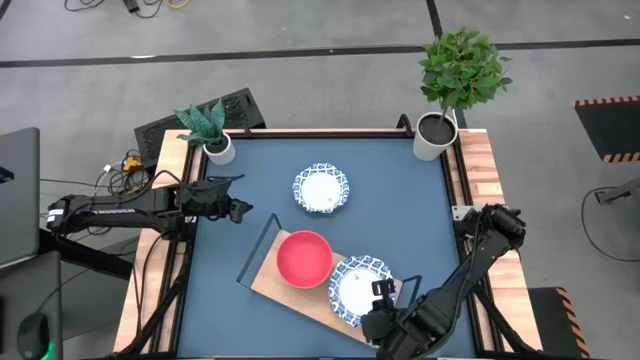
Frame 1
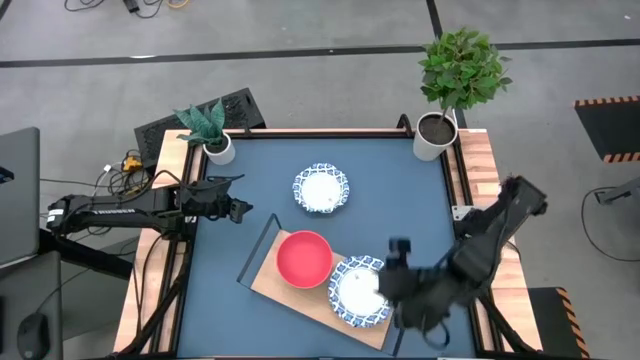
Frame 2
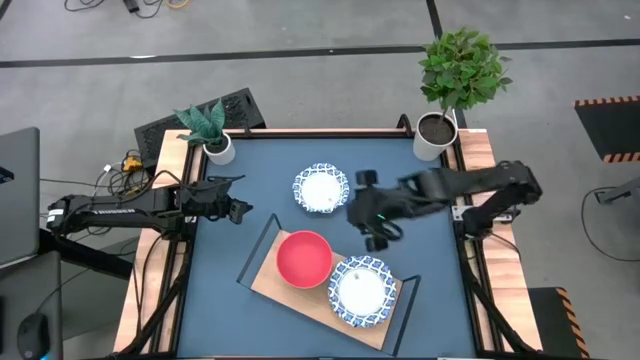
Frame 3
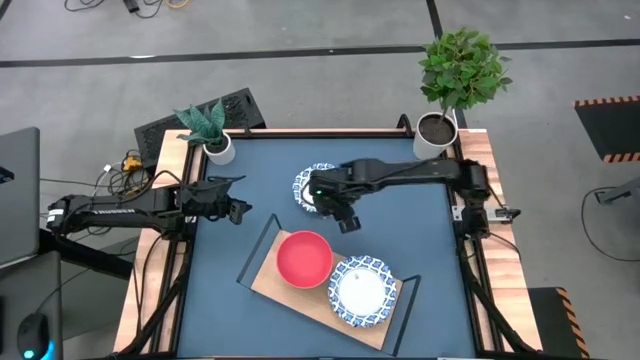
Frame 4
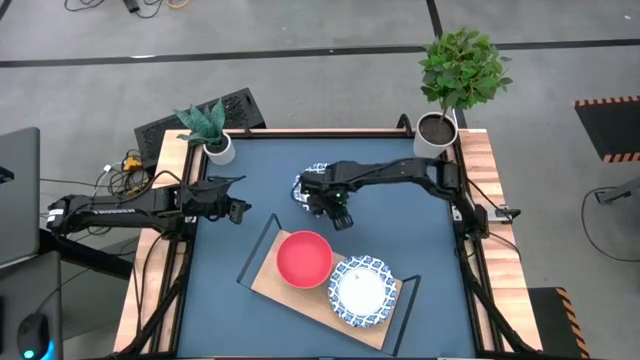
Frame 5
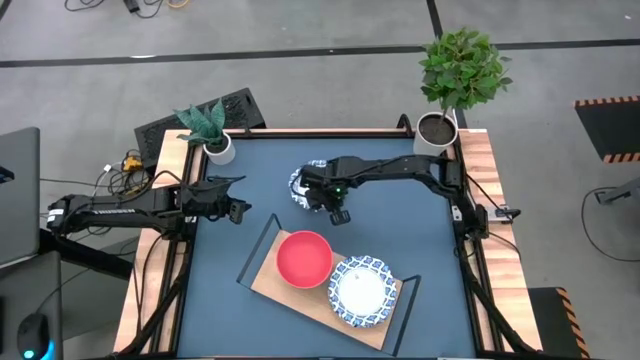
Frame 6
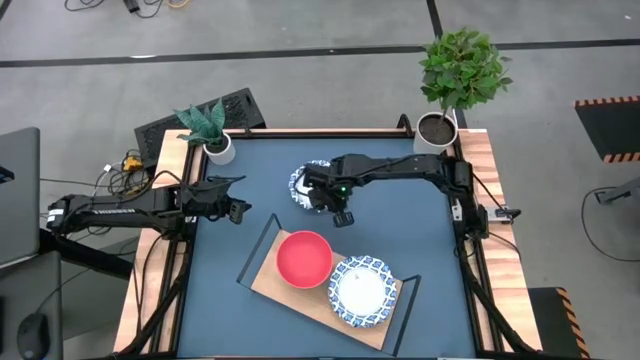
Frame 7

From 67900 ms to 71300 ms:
Task: Place and stack bowls onto a shelf
Stack the white bowl on top of the other white bowls on the shelf

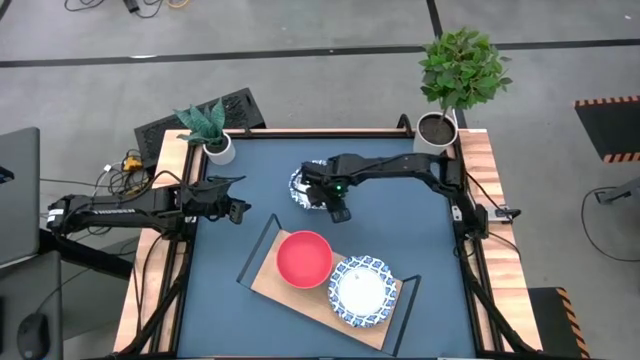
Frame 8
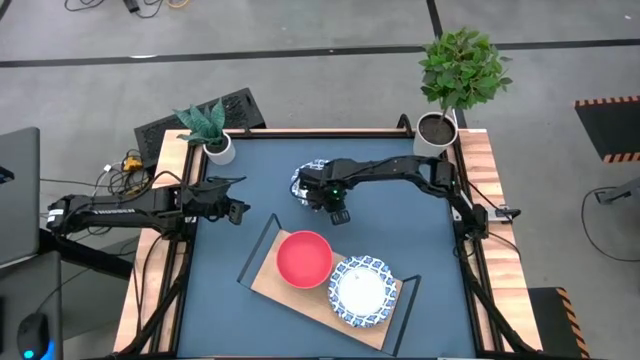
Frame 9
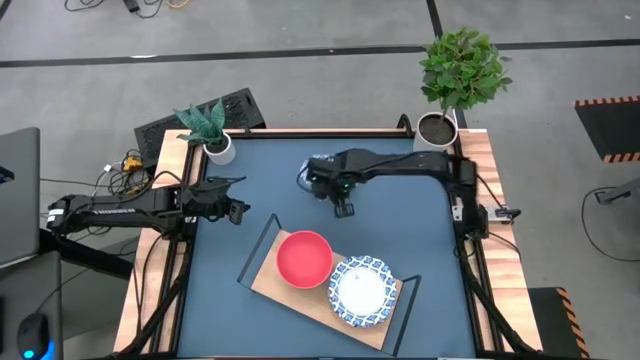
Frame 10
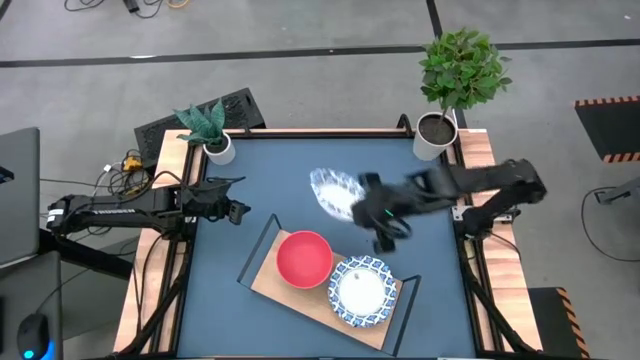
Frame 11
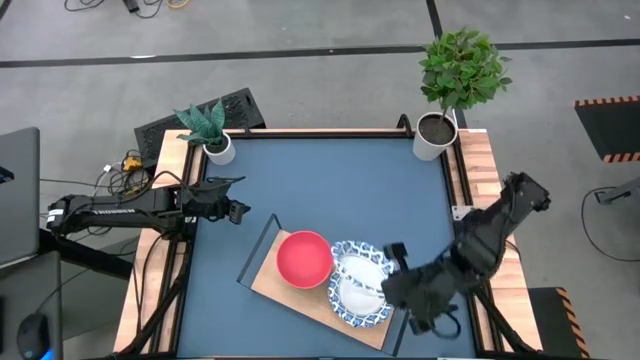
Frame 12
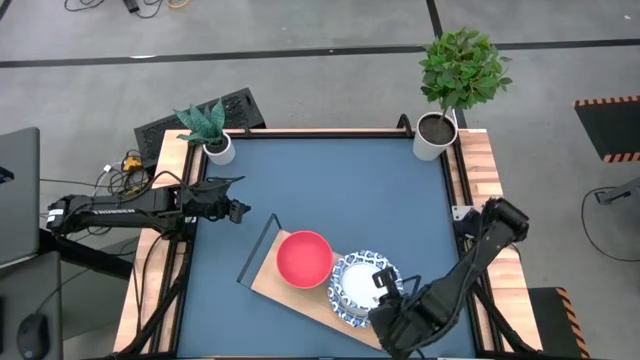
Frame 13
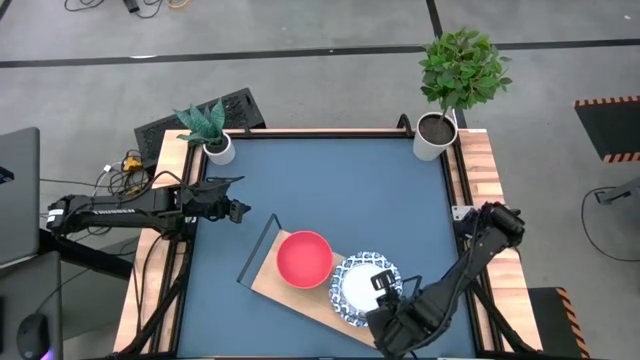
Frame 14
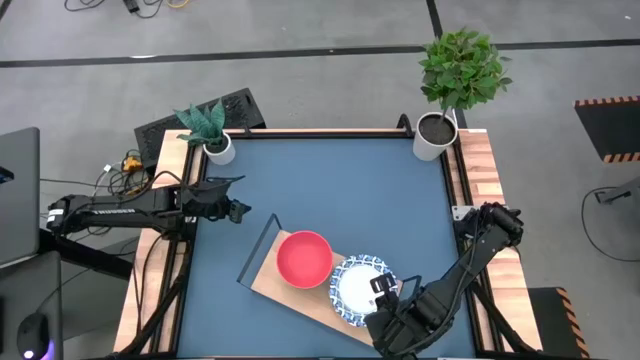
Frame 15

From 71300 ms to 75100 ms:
Stack the white bowl on top of the other white bowls on the shelf

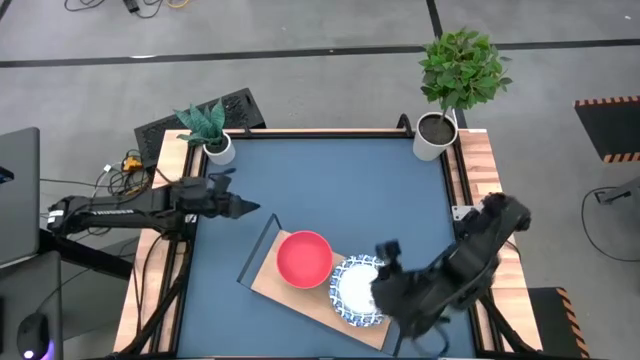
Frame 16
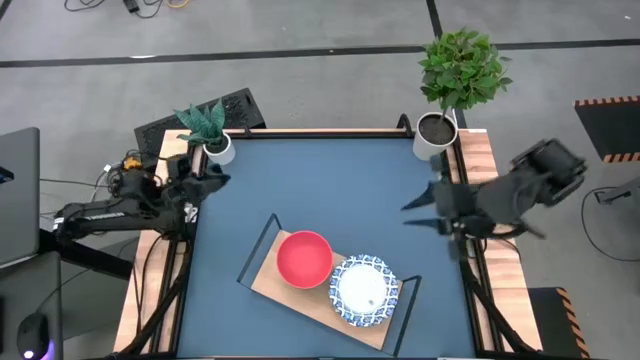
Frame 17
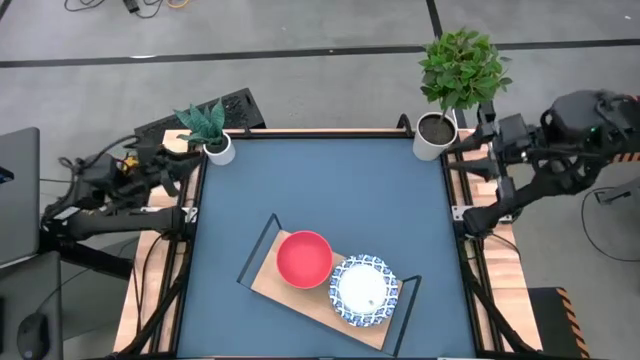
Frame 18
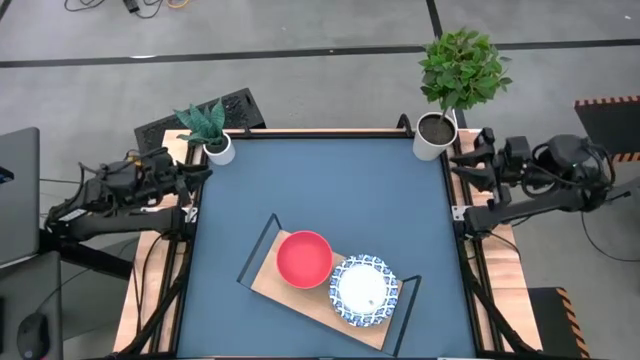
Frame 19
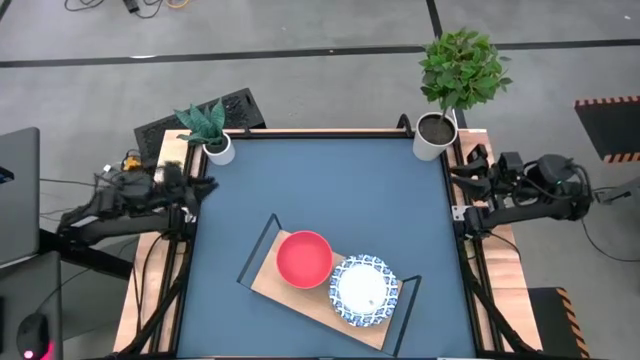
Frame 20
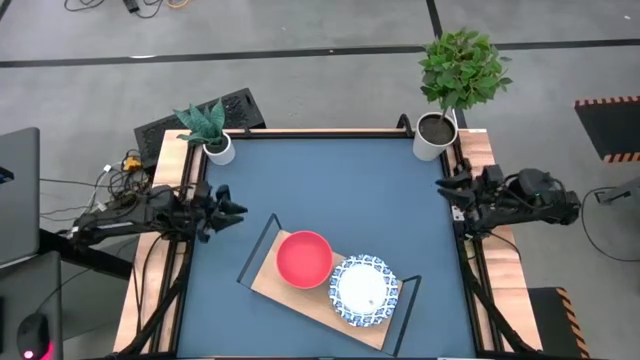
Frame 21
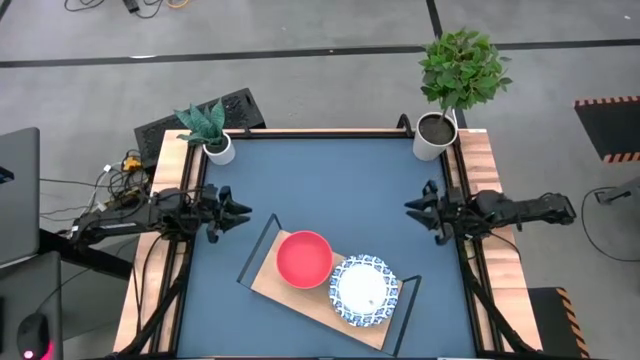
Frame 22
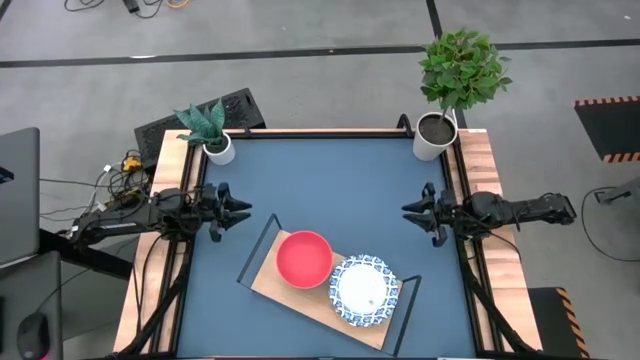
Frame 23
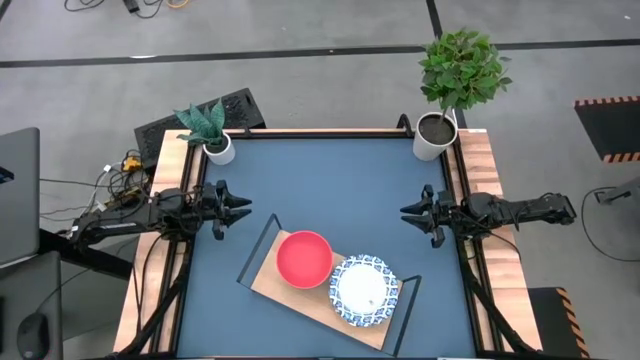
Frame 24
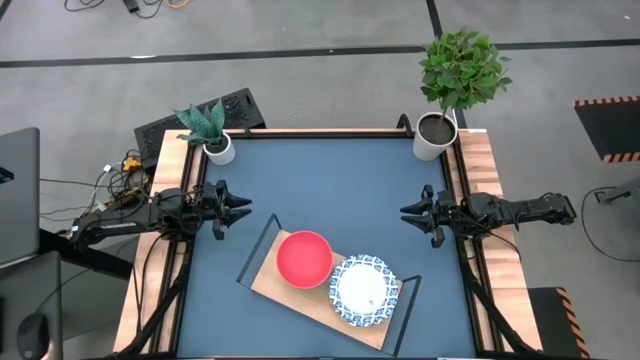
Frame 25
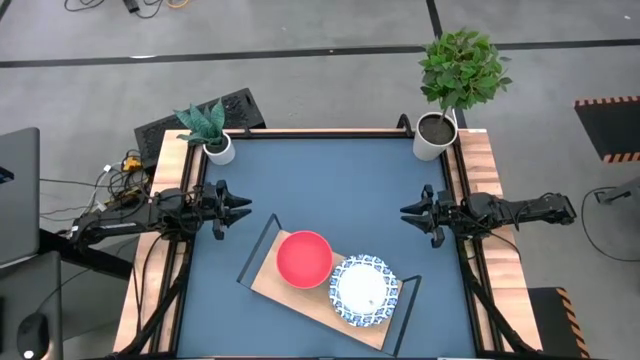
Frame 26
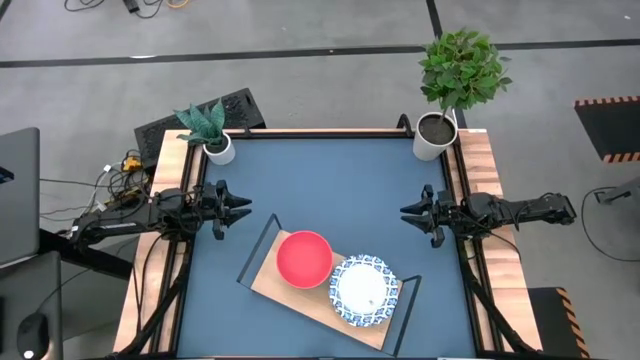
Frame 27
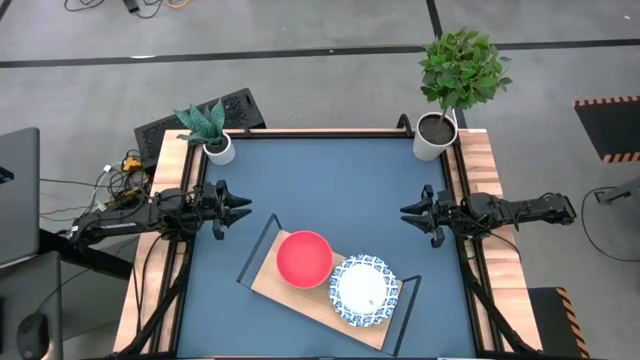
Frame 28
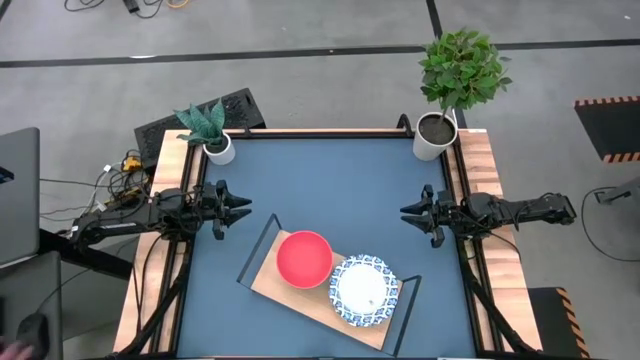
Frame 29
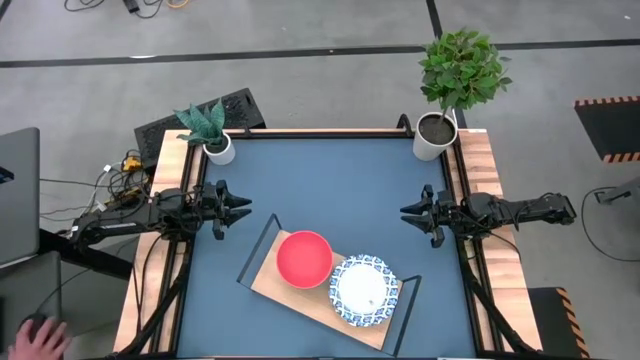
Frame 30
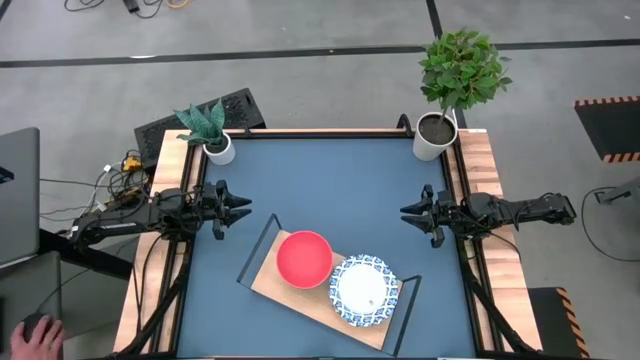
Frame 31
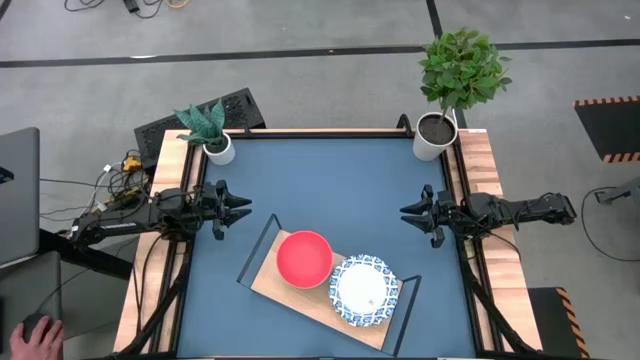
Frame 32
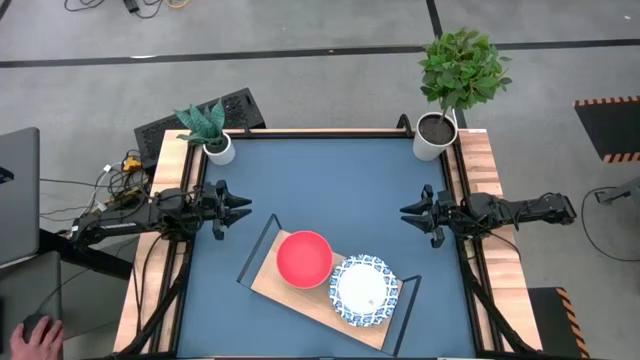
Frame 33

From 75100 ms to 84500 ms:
Return to Home Position

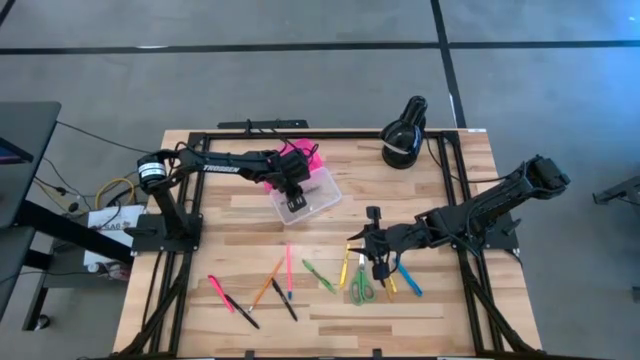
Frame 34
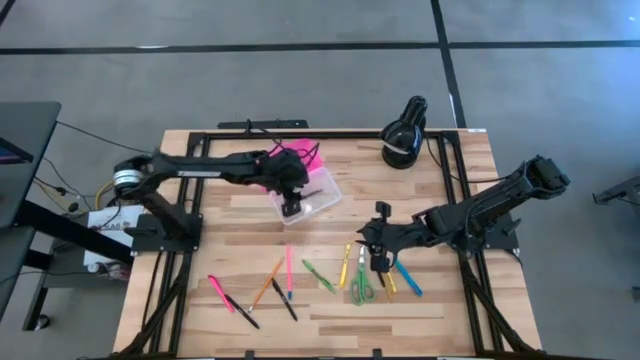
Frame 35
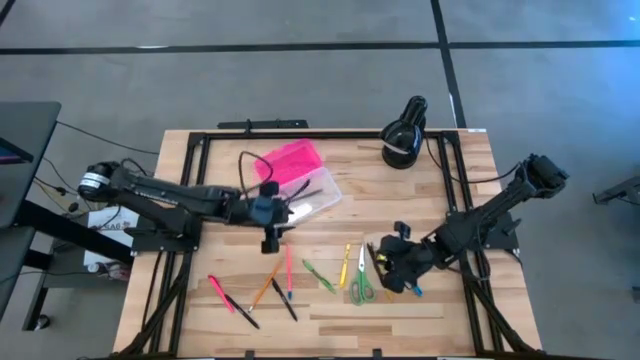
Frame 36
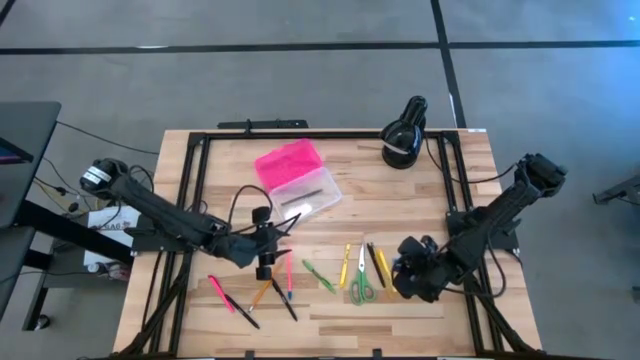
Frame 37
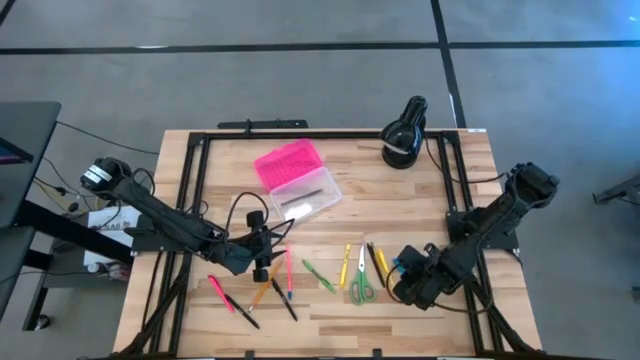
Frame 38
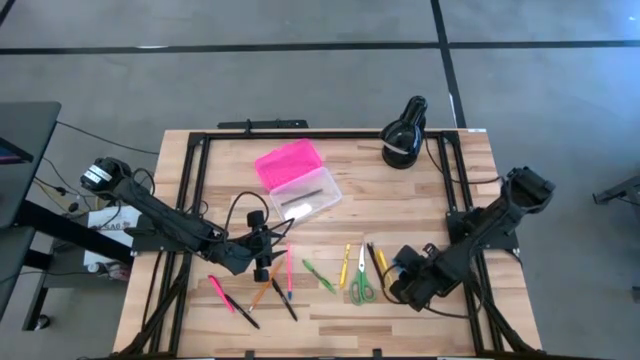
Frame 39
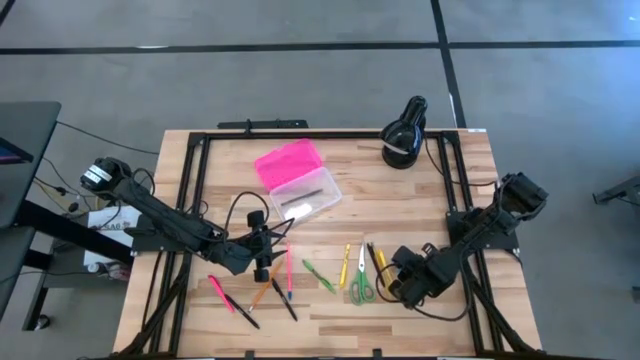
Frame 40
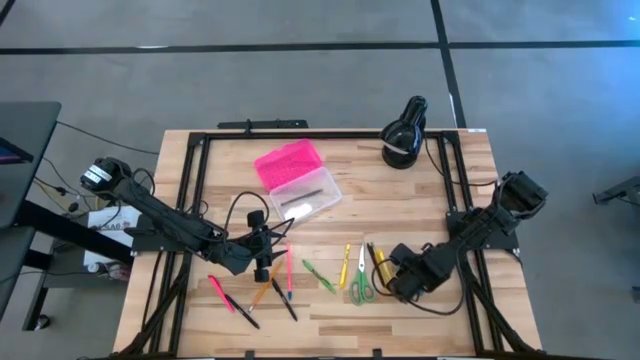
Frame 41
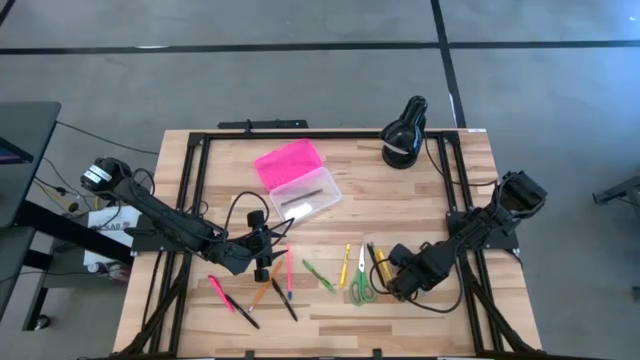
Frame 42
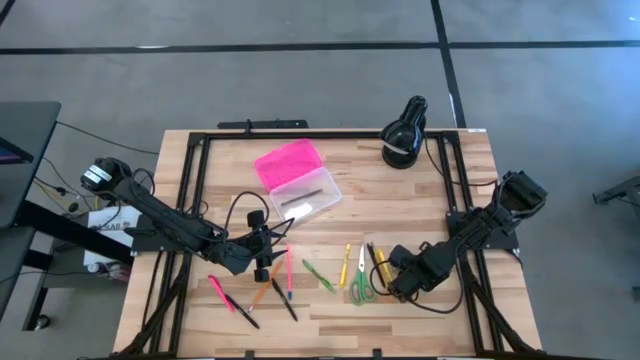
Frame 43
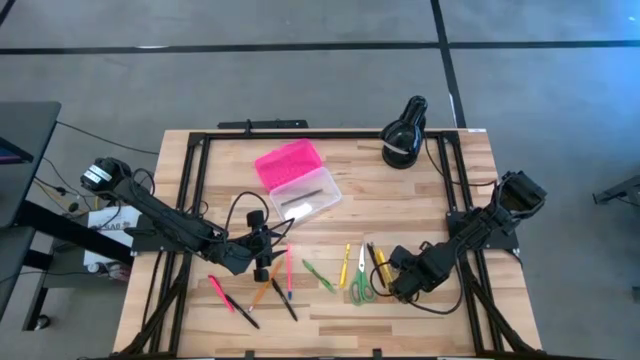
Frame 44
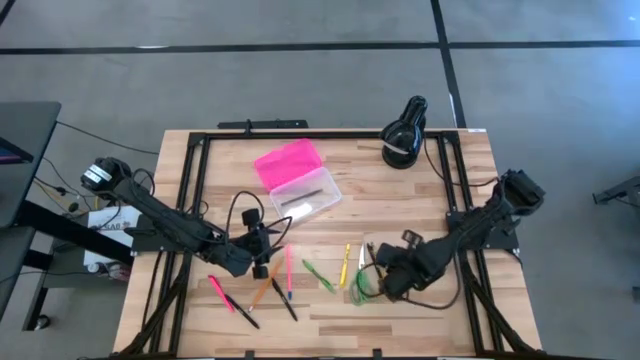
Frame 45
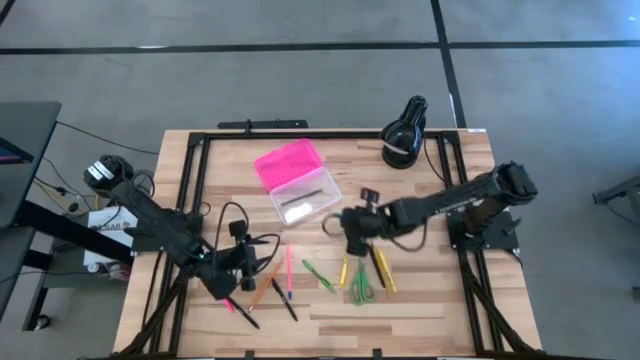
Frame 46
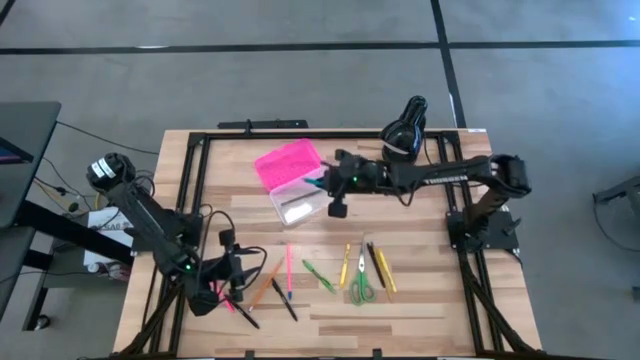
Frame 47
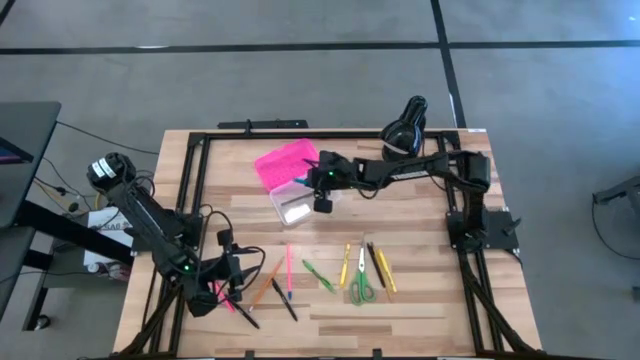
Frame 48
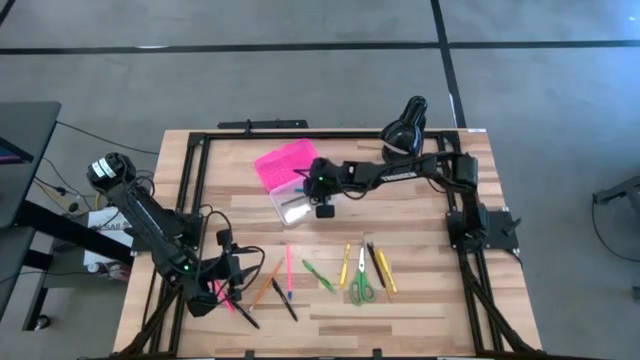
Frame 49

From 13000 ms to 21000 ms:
Task: Pick & place school supplies into a supply box
Put the blue pen into the black supply box
